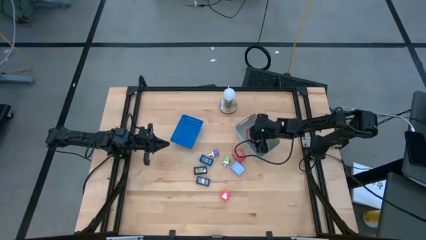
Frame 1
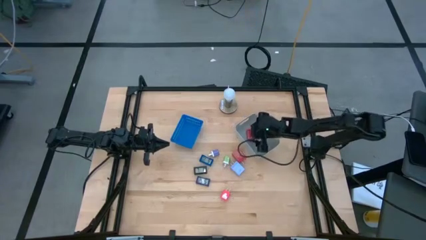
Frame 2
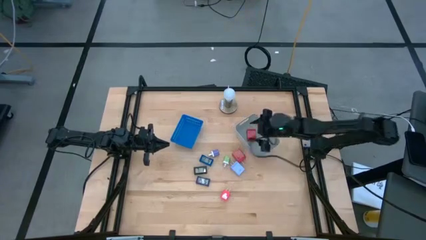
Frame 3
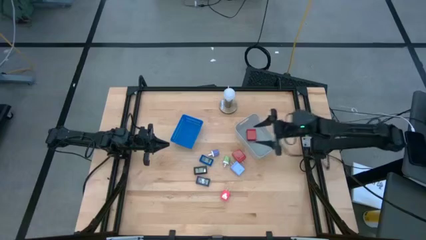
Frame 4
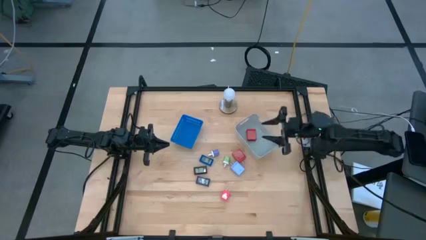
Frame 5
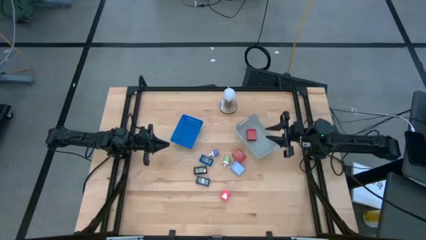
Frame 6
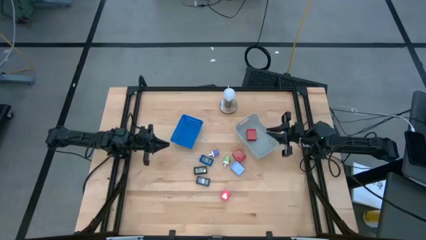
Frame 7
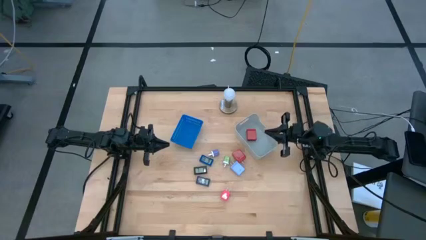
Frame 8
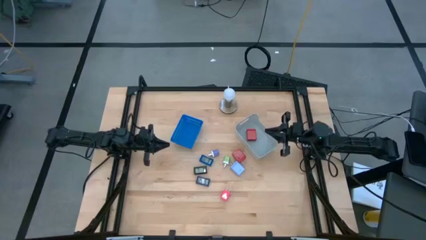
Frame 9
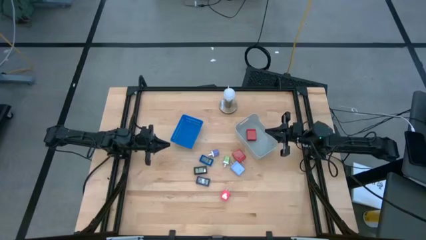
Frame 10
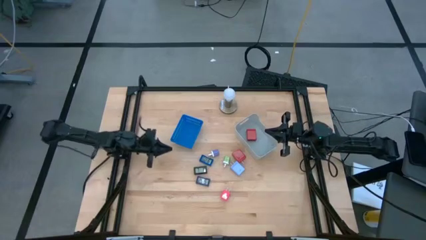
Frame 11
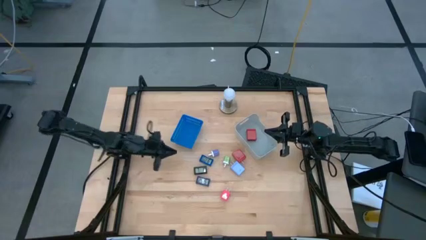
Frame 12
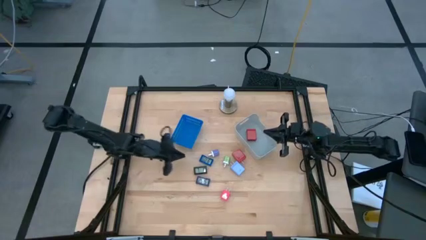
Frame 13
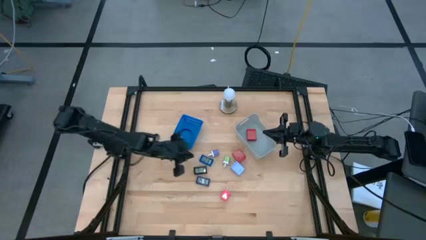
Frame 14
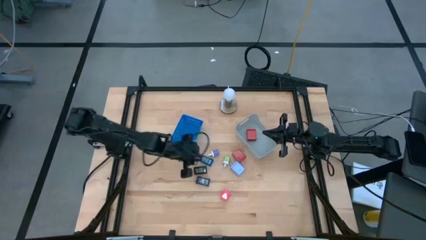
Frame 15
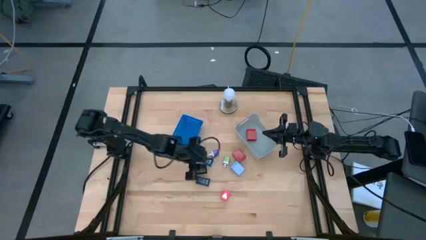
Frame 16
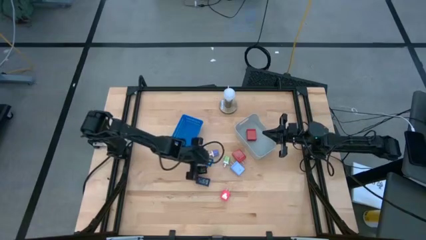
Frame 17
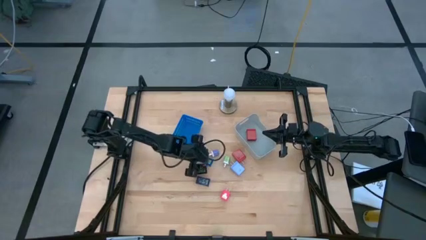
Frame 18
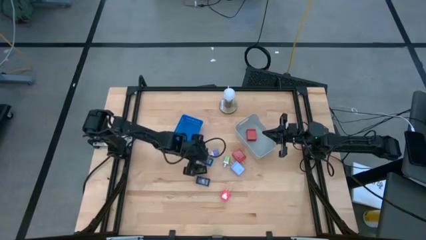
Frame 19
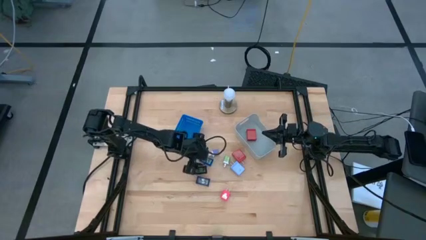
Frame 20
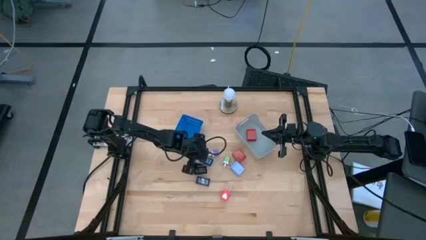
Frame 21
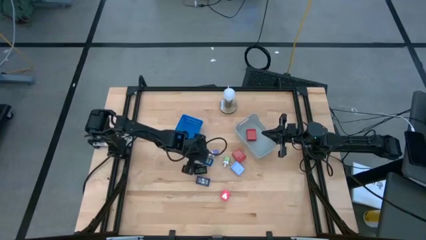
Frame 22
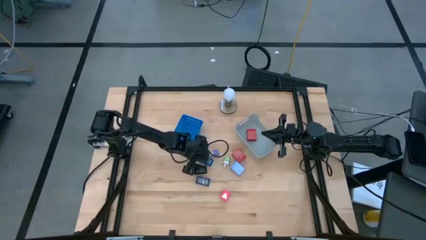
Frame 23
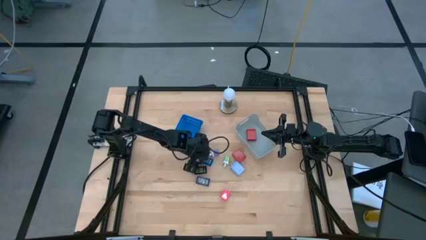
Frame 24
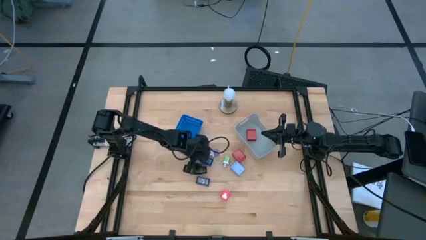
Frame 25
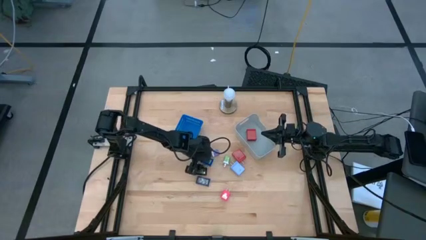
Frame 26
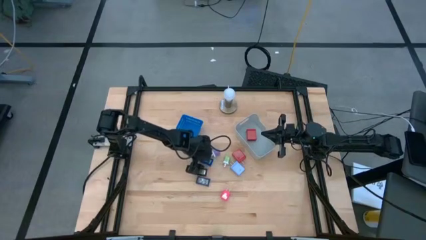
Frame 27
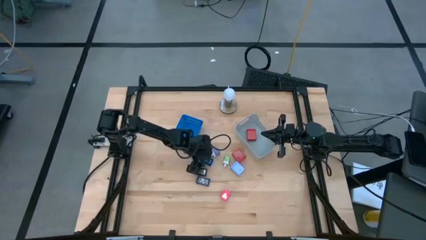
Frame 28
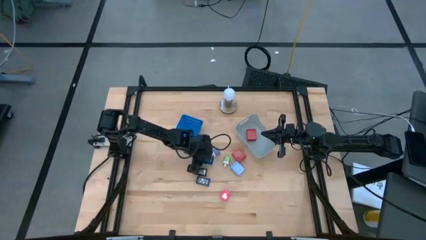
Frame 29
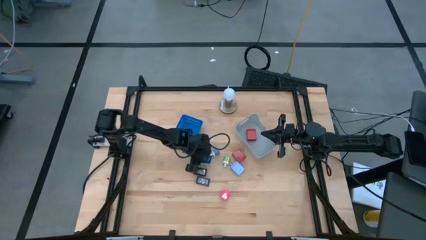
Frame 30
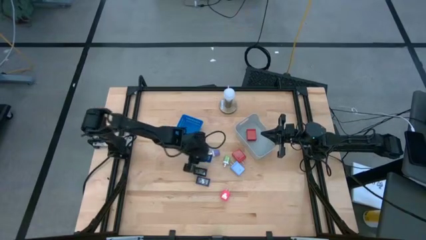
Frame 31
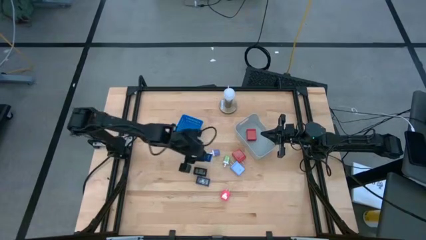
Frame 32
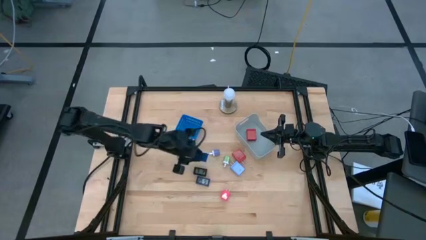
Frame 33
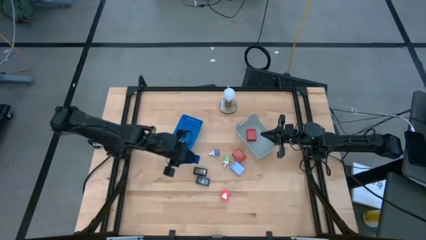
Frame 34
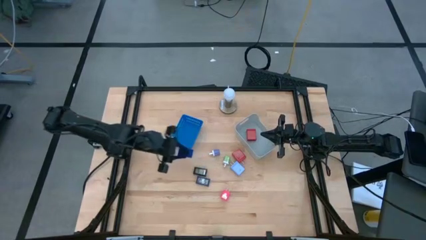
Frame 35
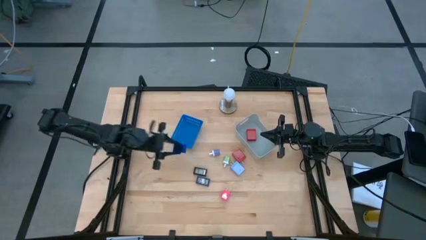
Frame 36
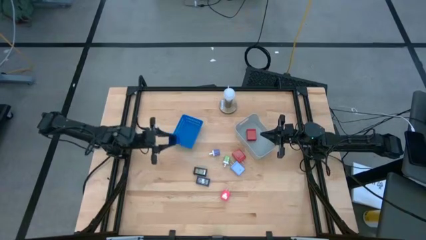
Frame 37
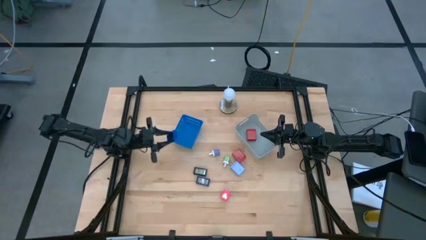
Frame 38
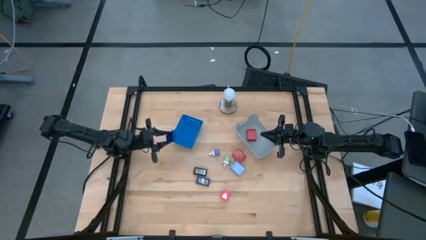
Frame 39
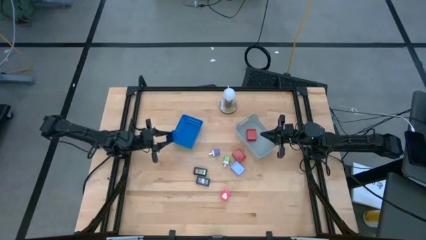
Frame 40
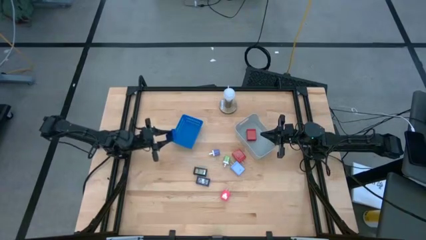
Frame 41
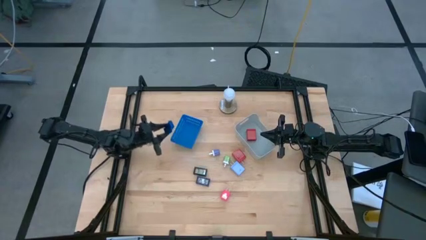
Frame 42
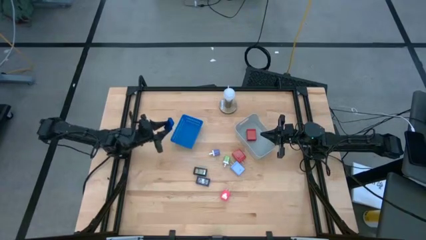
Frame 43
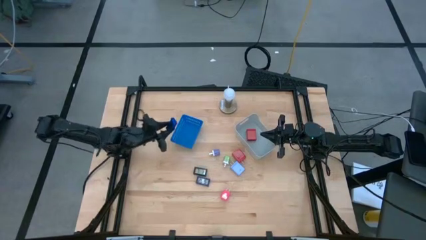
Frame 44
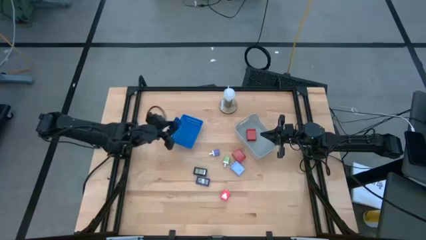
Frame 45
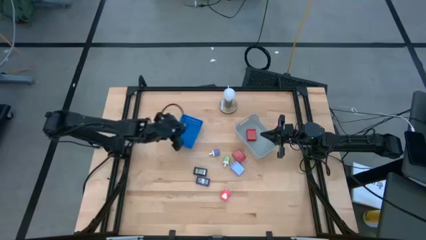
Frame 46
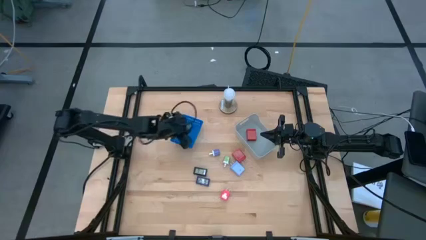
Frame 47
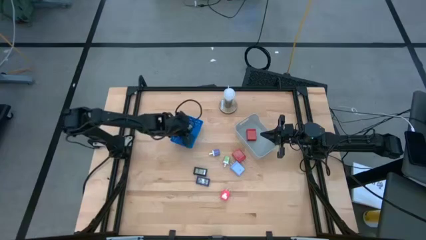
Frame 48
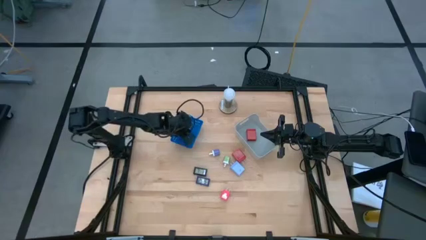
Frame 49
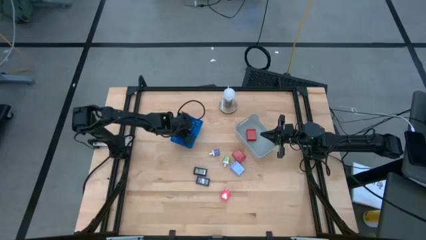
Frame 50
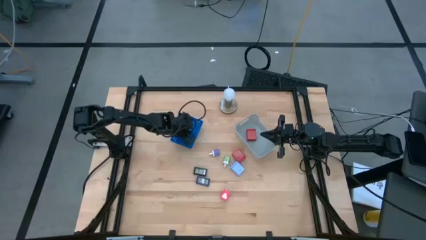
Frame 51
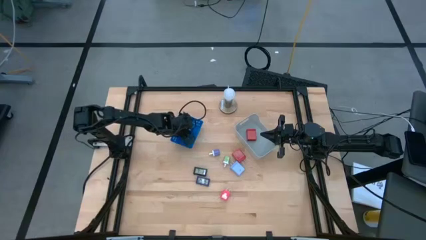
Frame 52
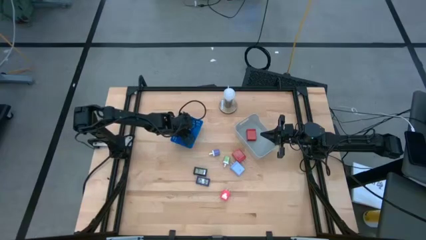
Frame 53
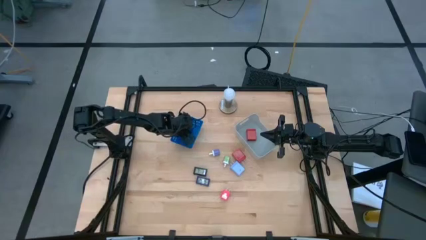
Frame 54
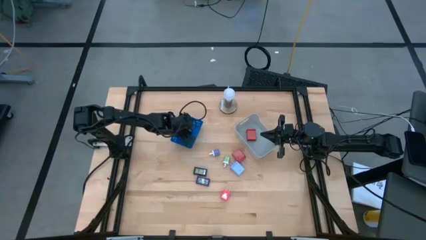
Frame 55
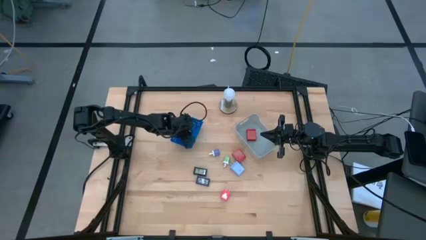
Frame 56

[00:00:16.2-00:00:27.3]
Task: Pick & Place Office items
Put the blue timer into the blue bin
